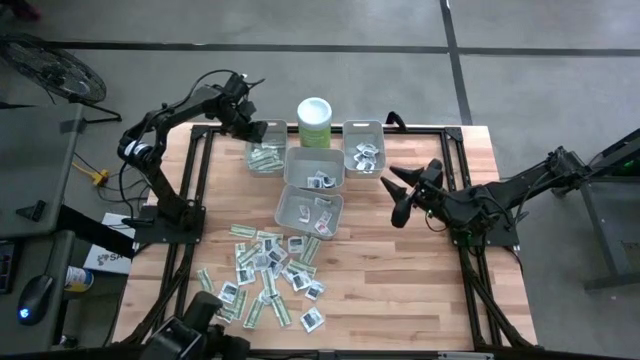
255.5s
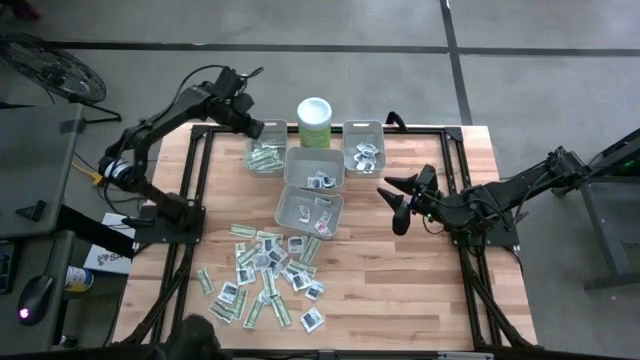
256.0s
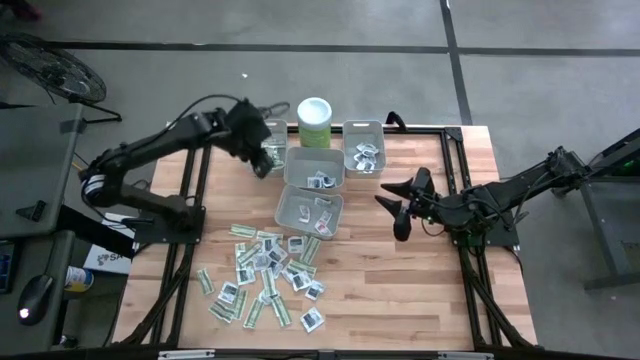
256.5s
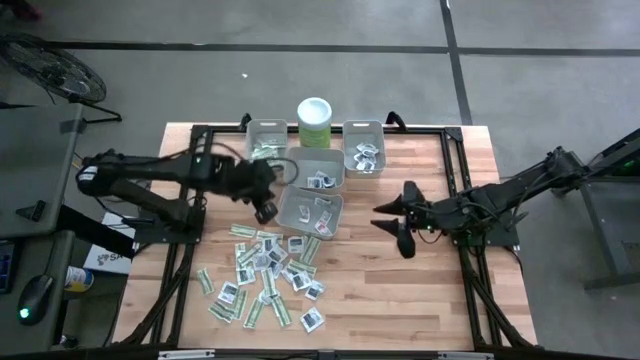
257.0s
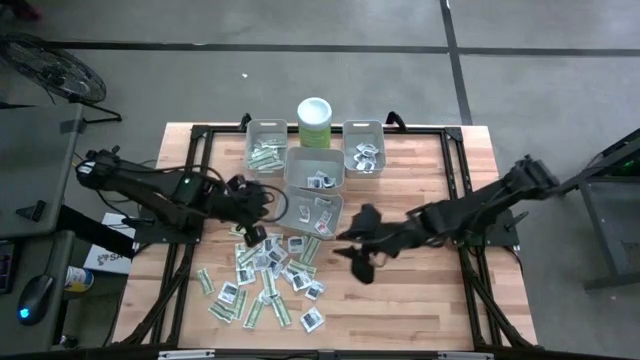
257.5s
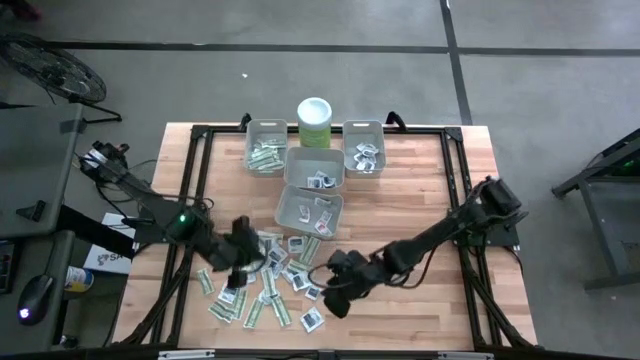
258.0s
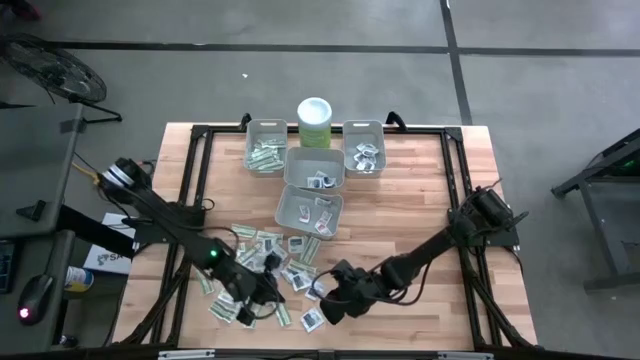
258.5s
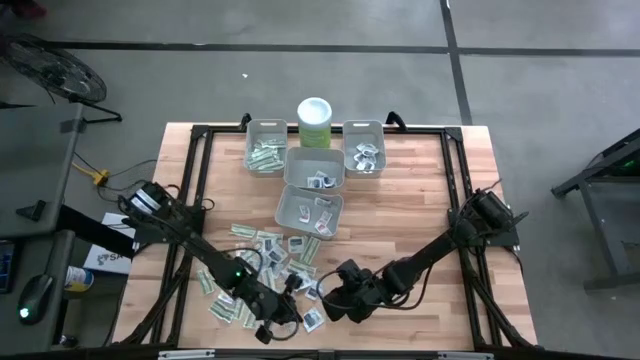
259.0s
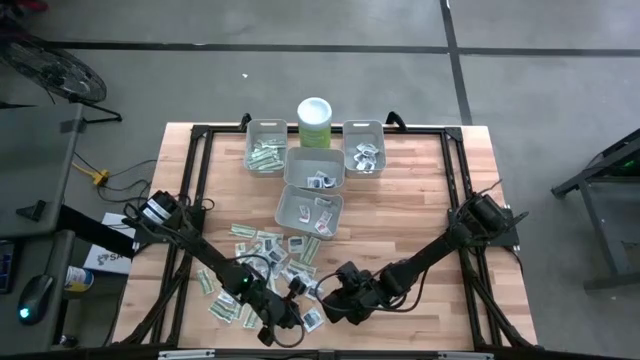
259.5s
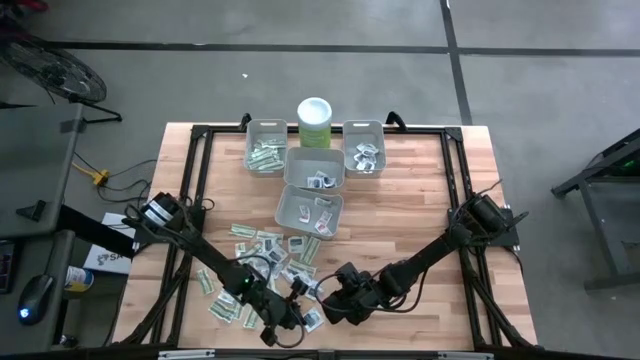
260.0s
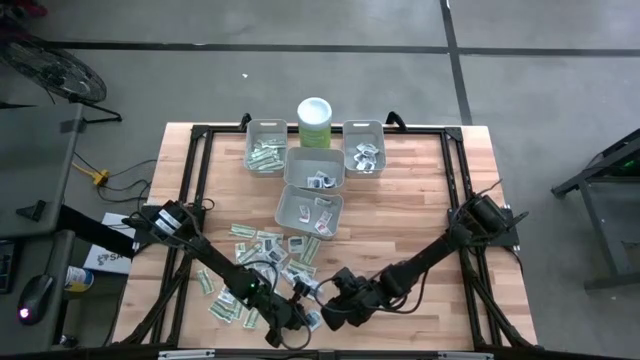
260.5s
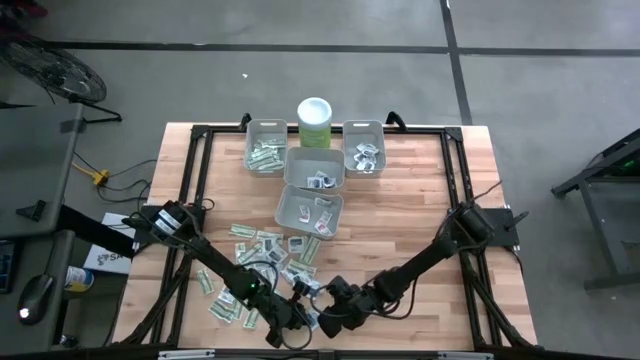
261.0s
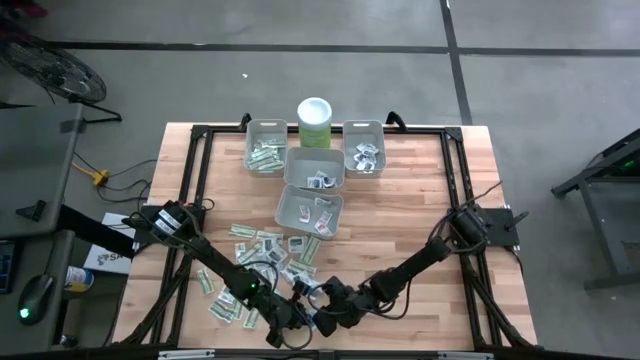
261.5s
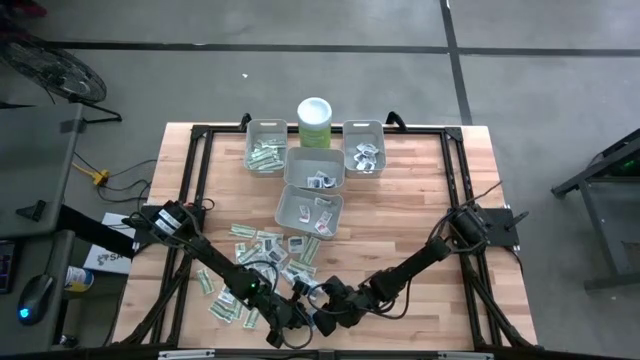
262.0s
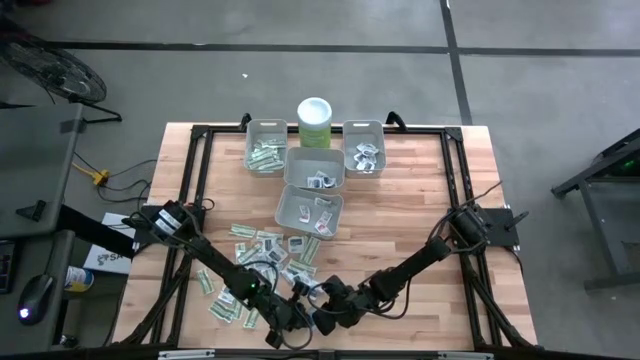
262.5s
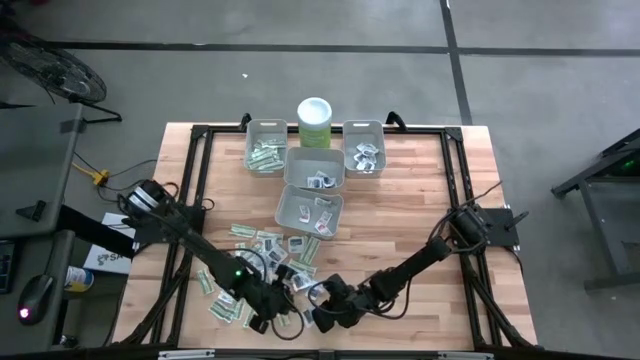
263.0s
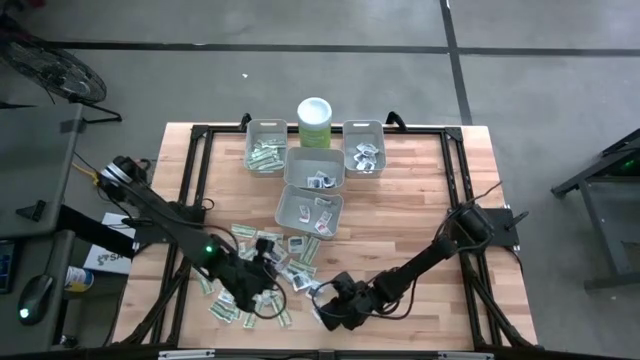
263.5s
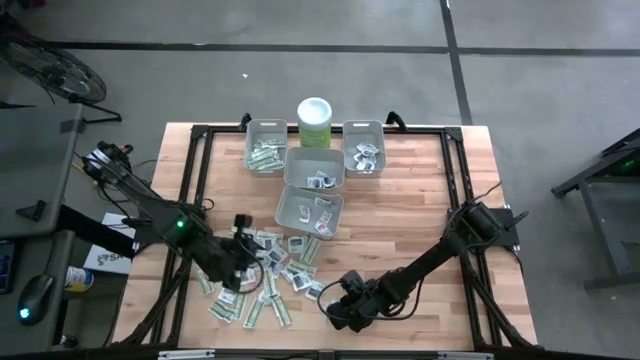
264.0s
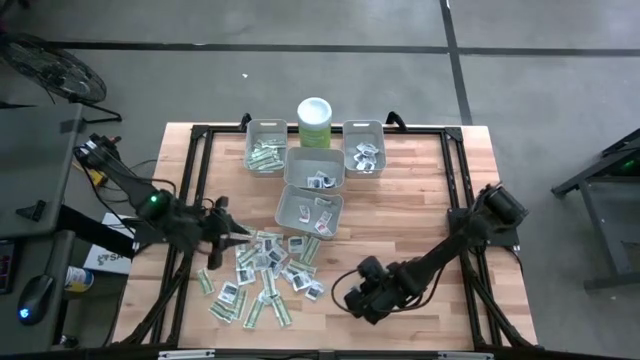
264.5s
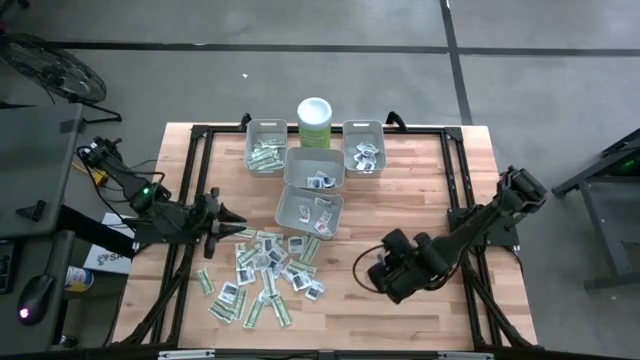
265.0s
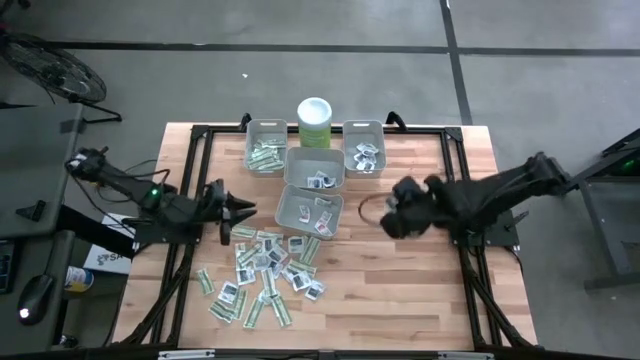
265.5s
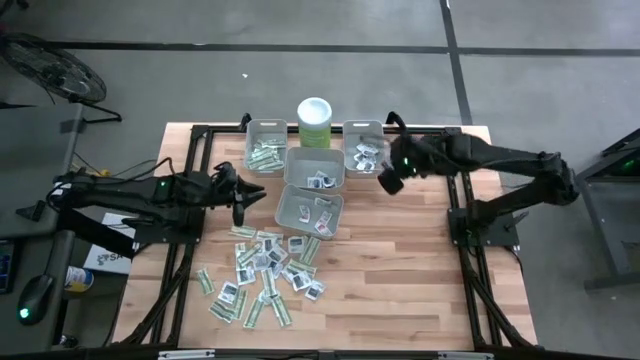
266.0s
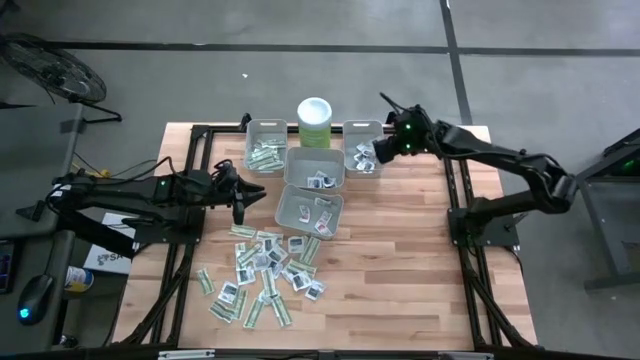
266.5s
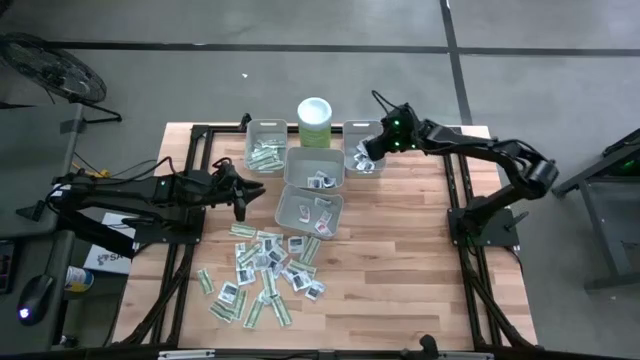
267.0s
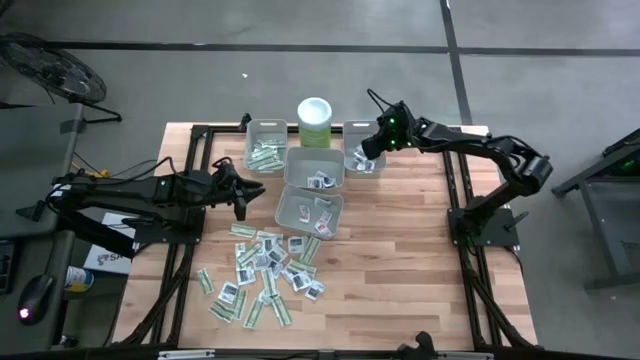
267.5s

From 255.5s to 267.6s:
Task: Pick & Place First Aid Supplies
Put the towelette pack into the right bin

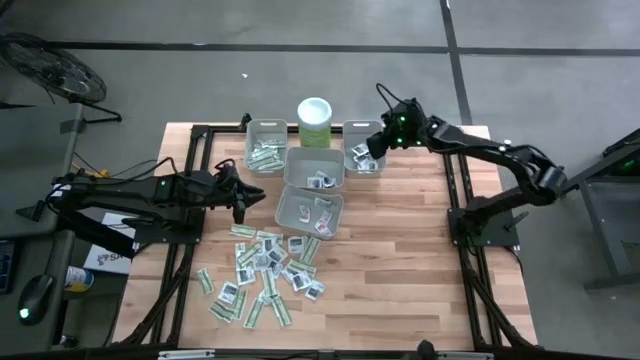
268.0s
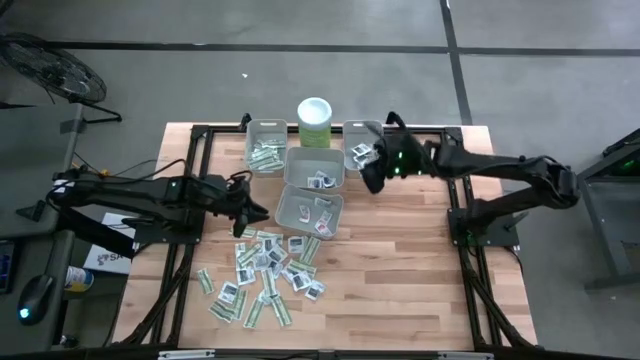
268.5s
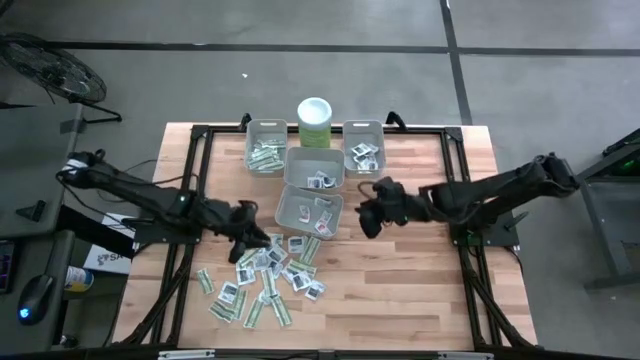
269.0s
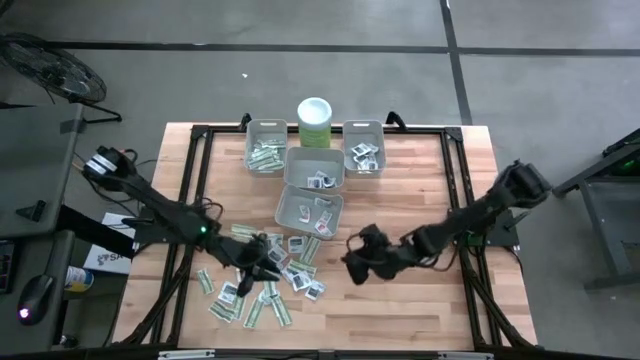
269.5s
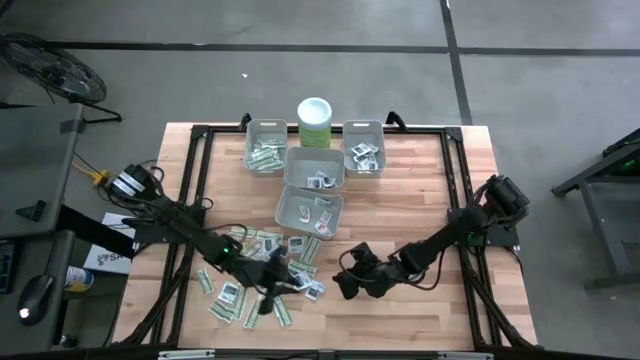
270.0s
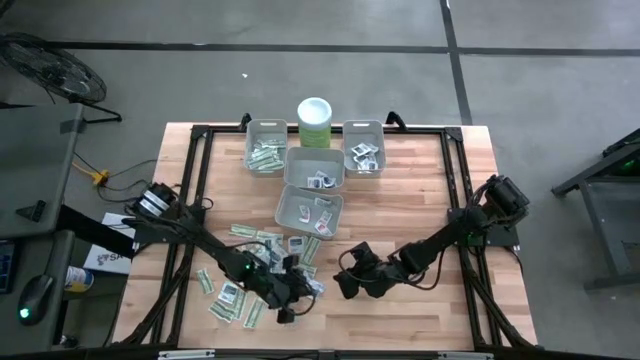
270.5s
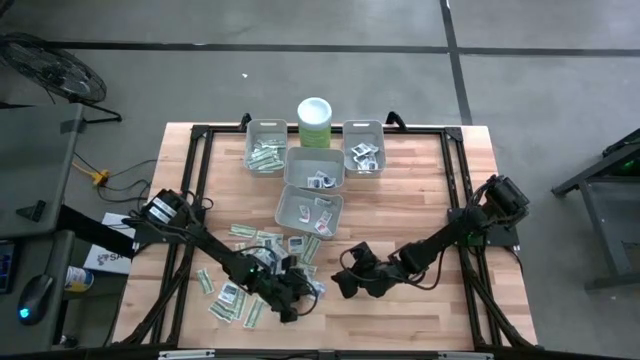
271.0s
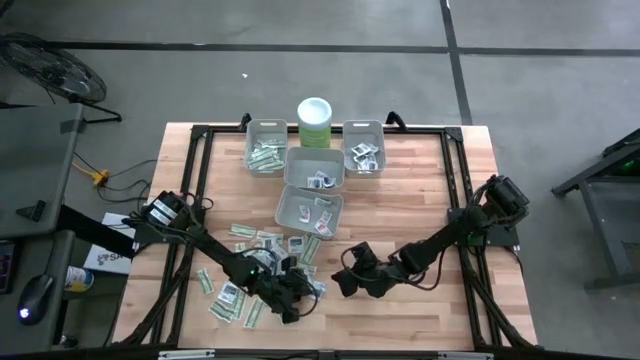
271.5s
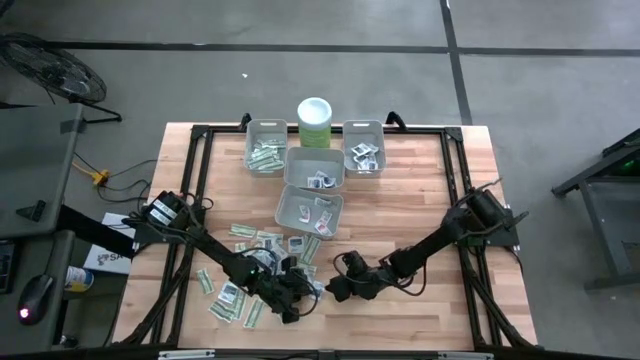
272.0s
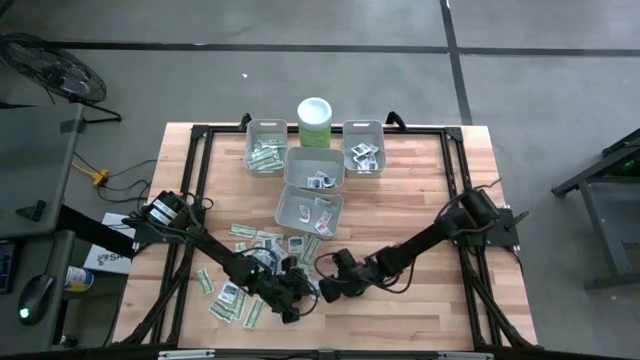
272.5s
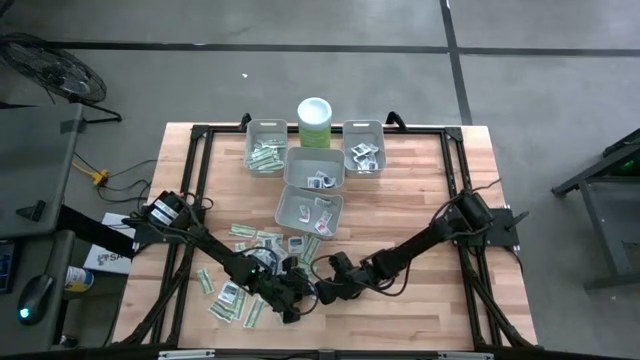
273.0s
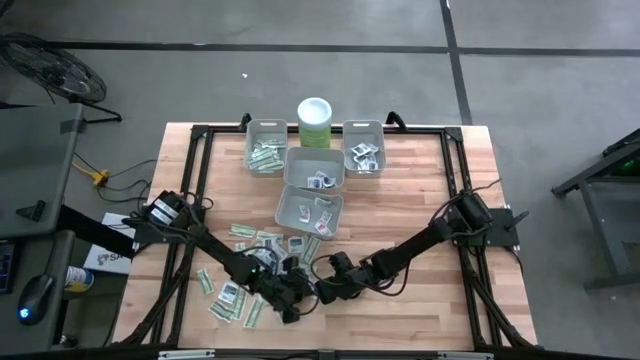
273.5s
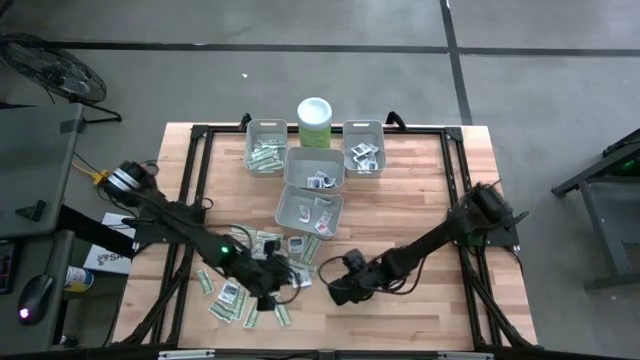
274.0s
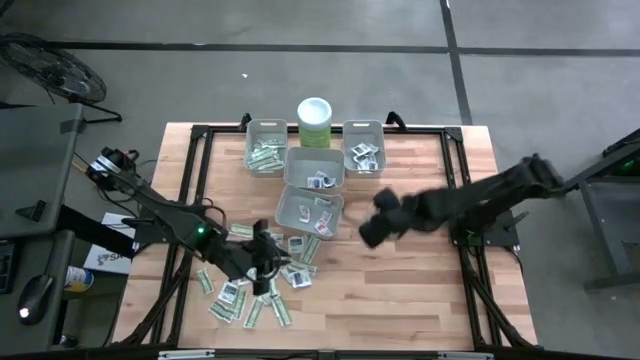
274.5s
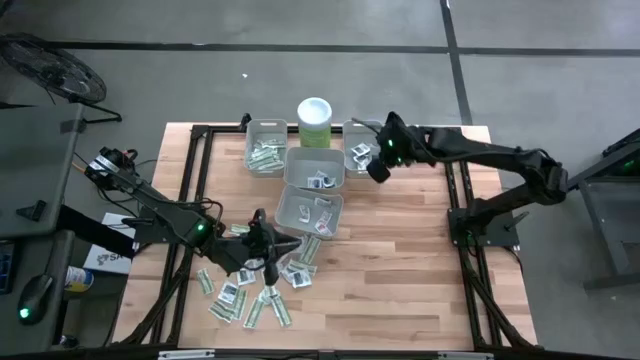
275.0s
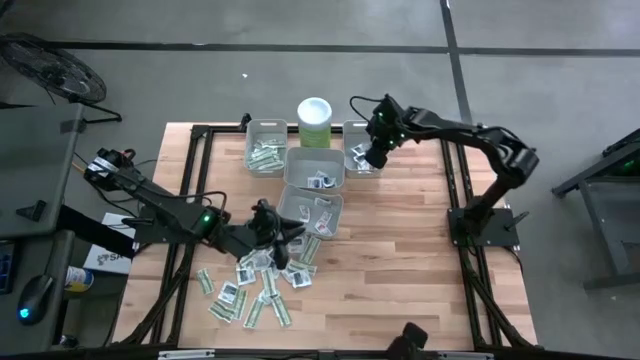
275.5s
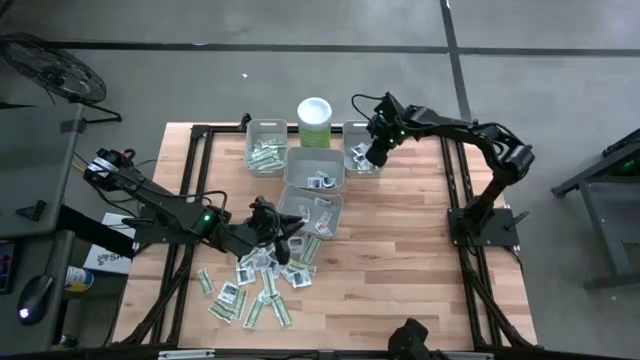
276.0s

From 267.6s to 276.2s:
Put the towelette pack into the right bin
